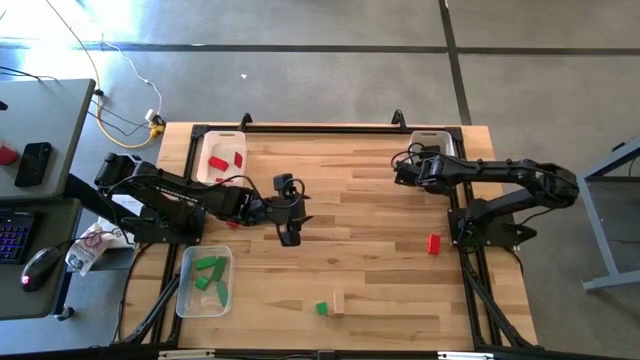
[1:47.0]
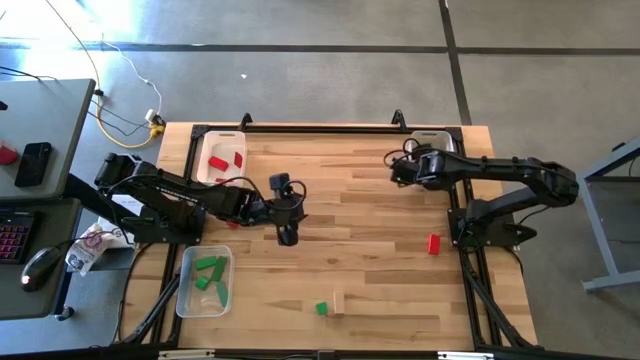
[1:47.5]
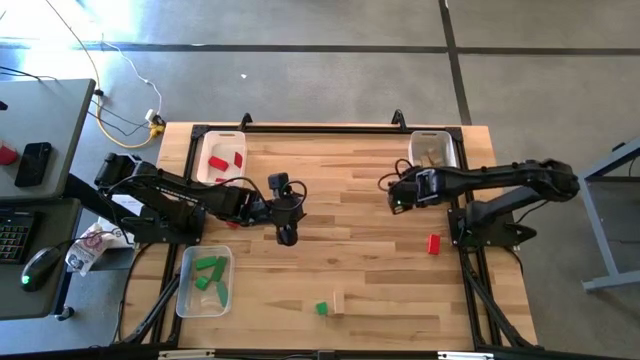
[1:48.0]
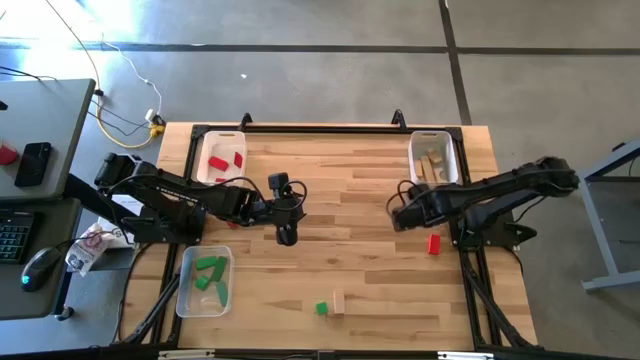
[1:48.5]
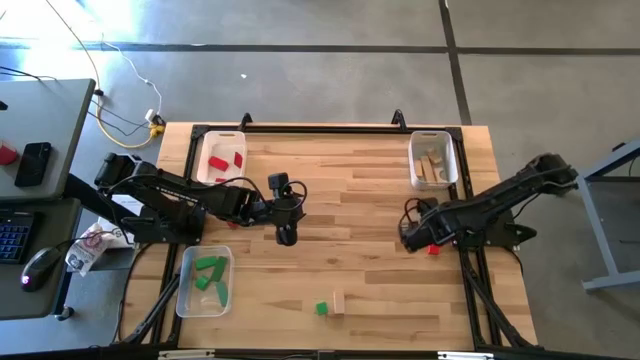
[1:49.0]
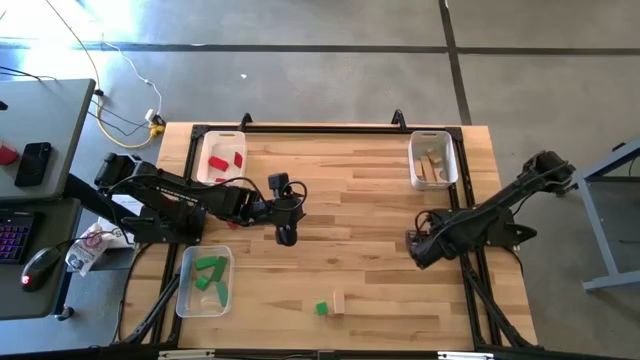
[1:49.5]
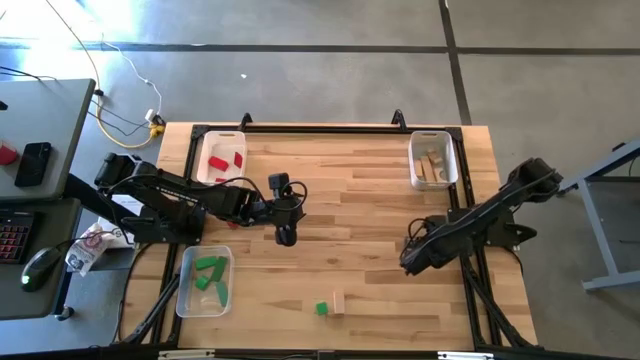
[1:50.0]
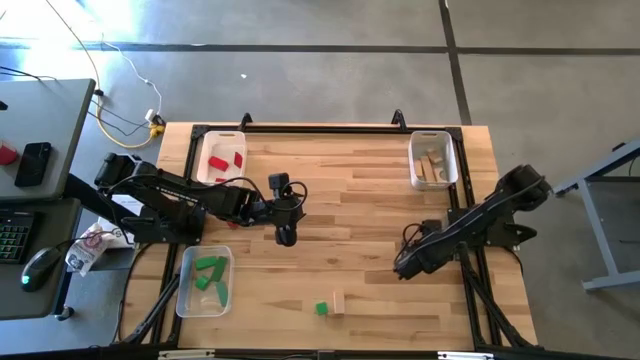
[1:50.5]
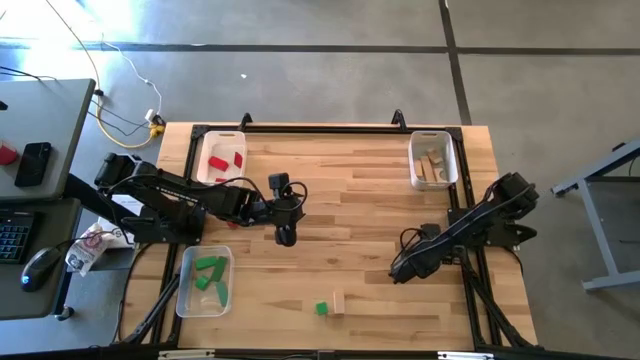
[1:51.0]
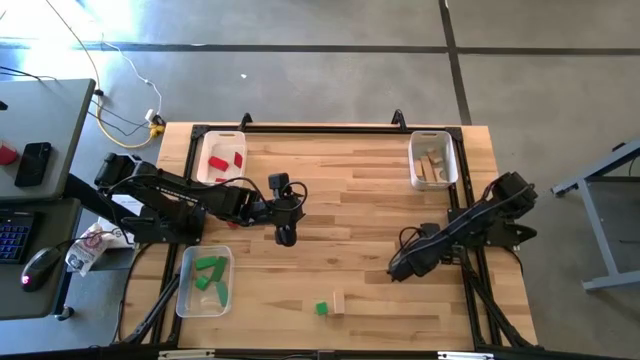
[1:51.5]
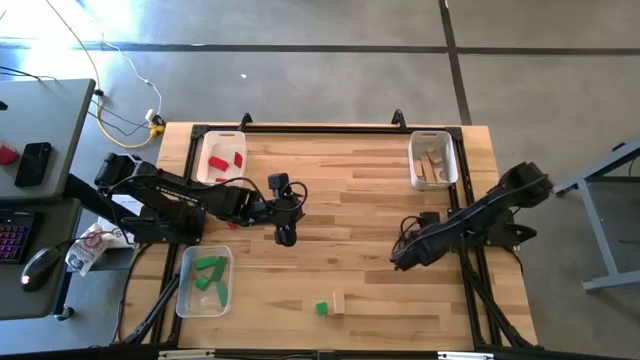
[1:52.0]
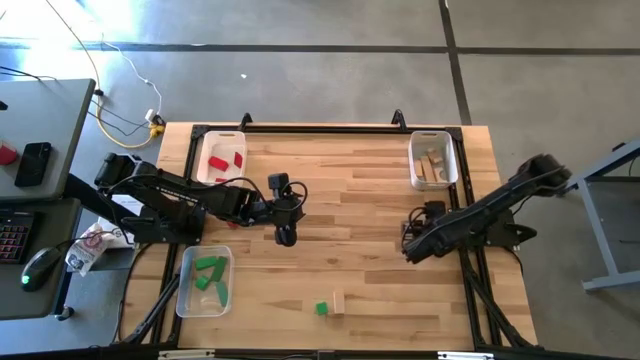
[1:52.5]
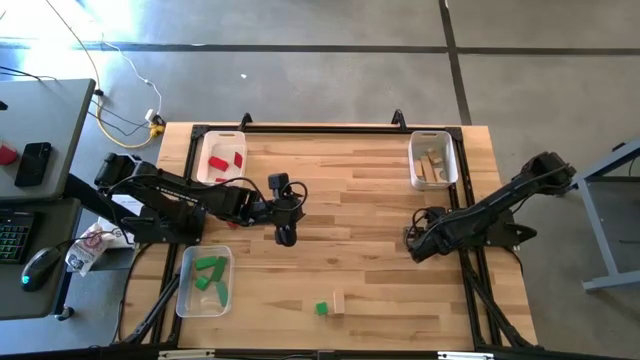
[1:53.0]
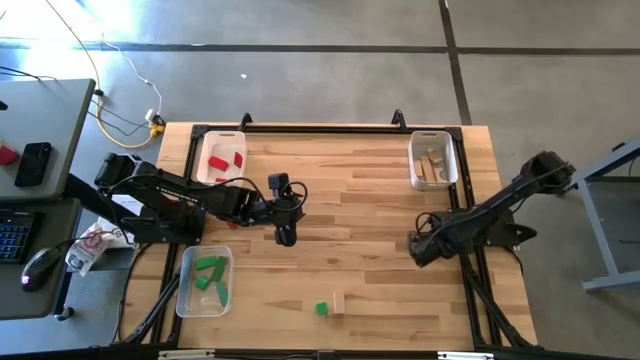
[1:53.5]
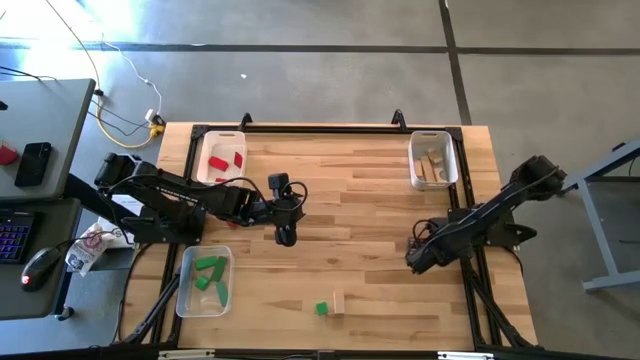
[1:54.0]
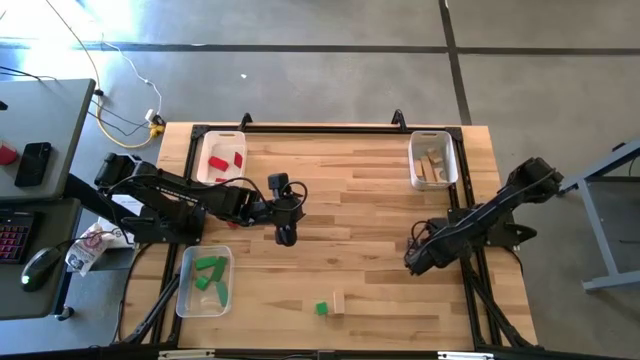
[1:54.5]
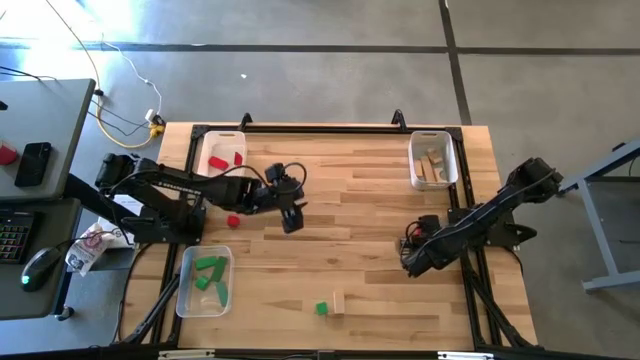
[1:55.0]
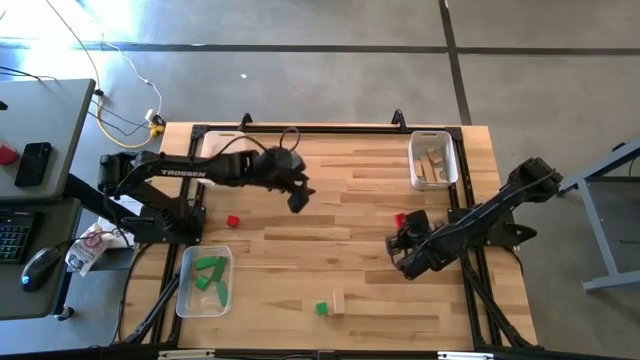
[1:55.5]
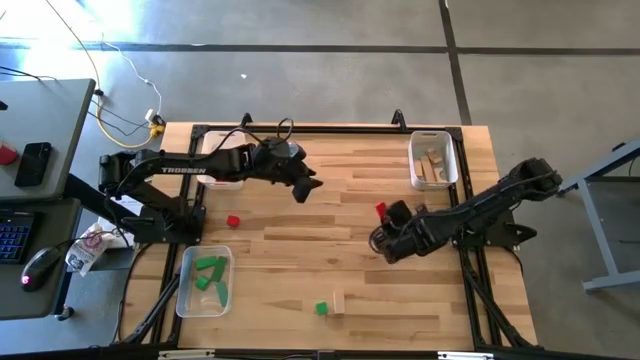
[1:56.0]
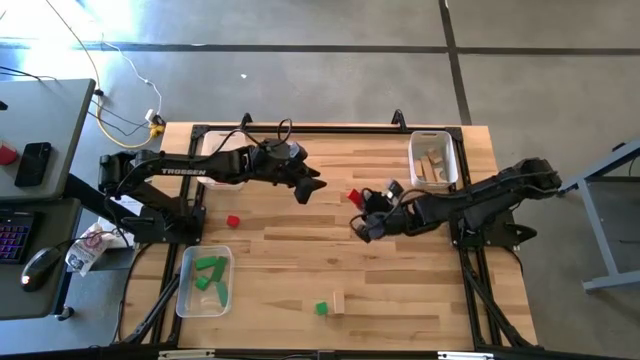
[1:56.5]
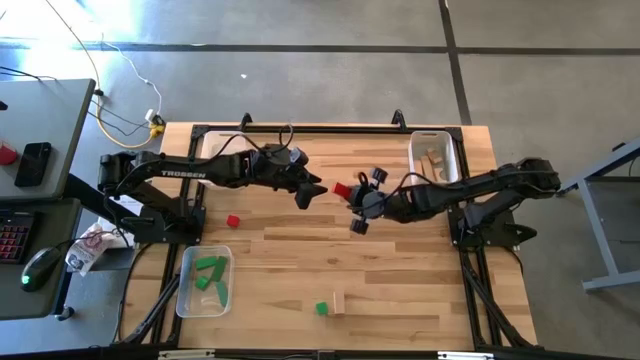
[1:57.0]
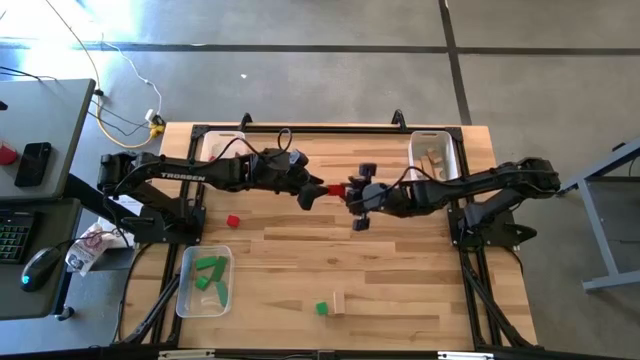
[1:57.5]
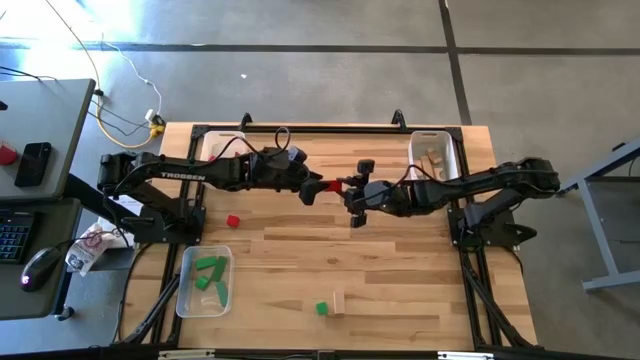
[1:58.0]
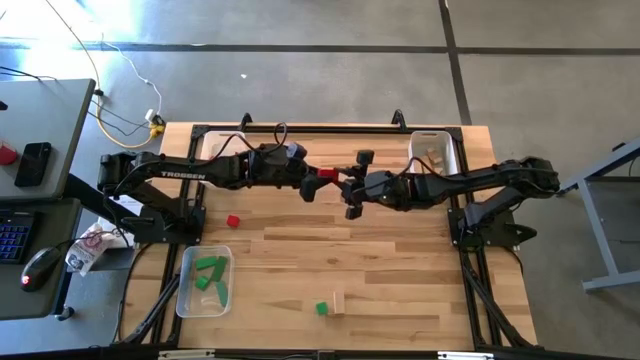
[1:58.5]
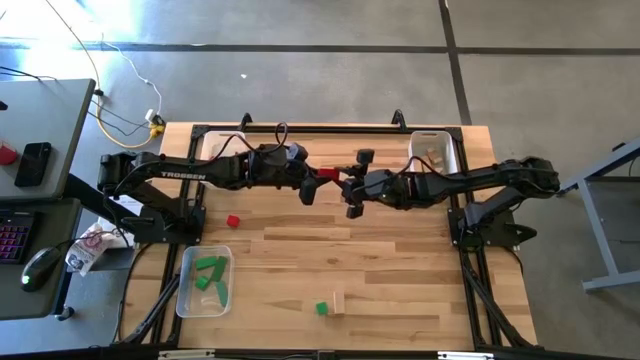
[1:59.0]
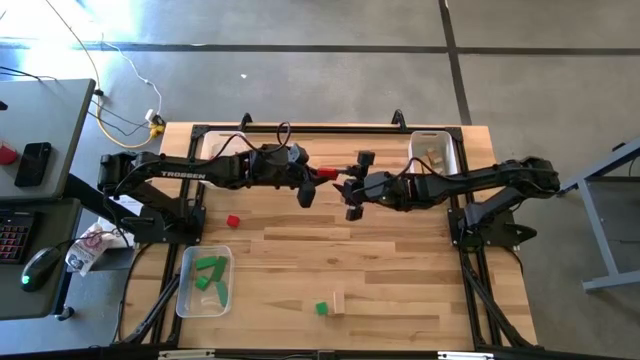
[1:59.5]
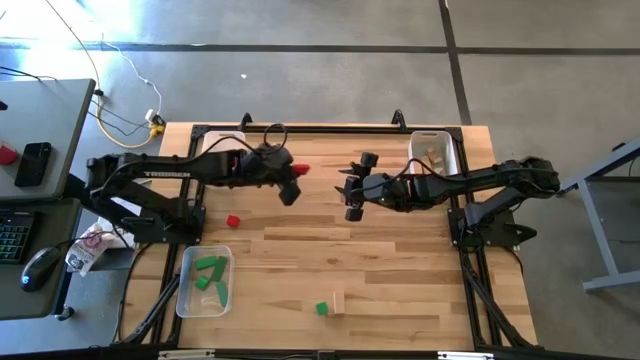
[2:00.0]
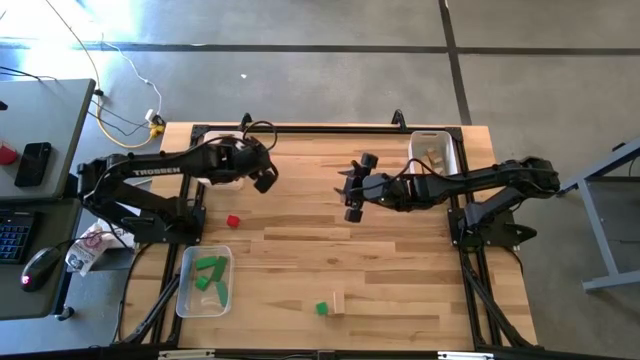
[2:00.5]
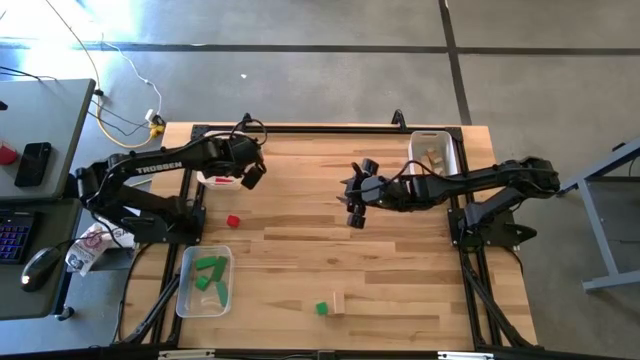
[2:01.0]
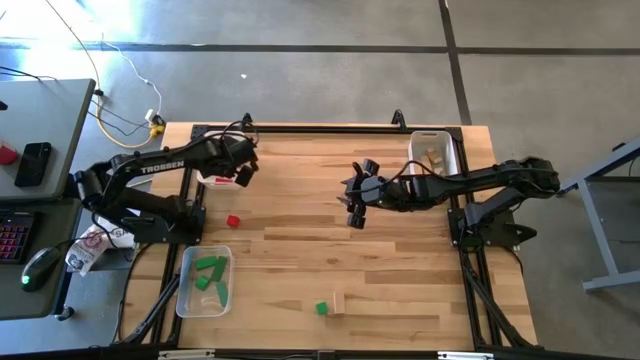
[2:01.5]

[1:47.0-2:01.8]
Task: Sort & place blocks by color
Put the red block into the white bin

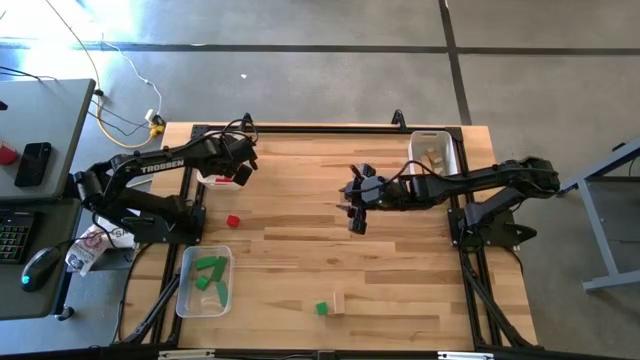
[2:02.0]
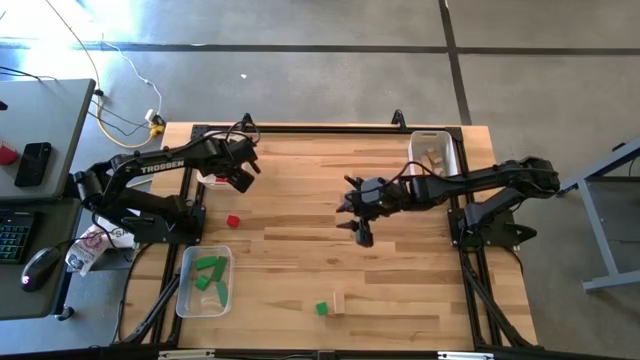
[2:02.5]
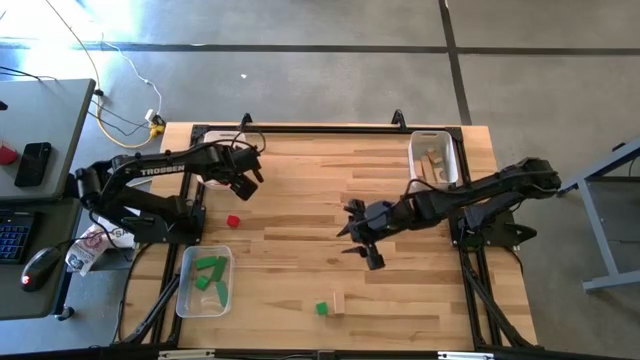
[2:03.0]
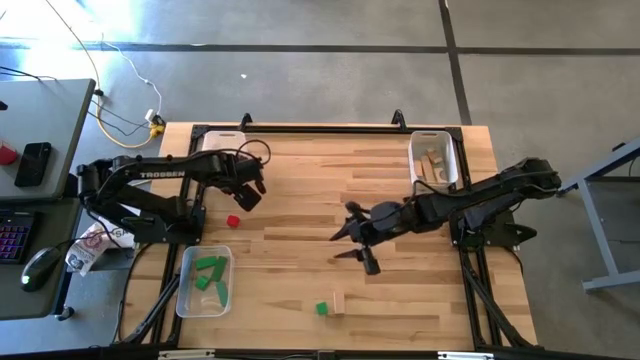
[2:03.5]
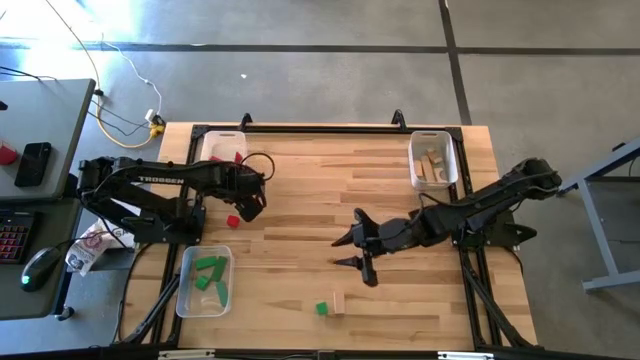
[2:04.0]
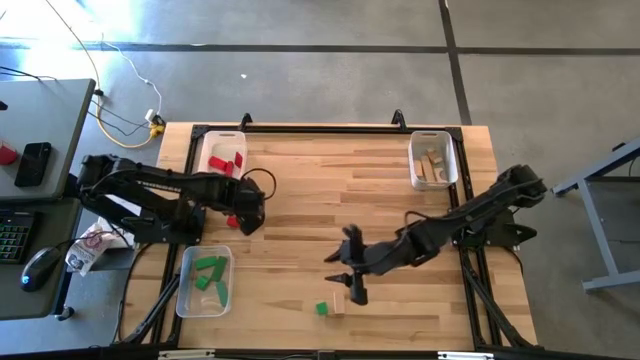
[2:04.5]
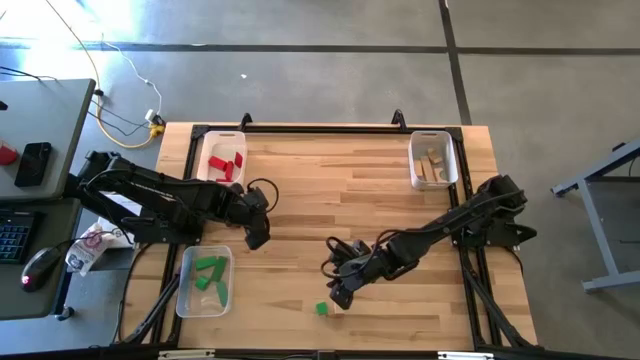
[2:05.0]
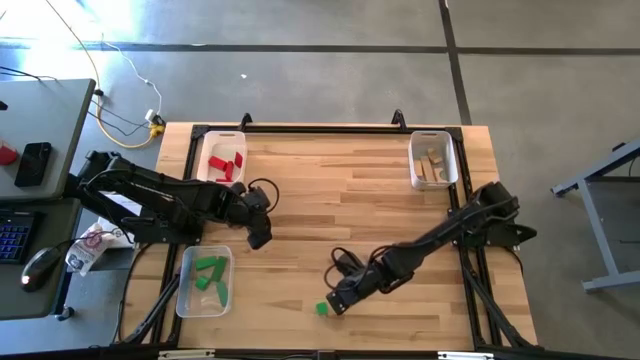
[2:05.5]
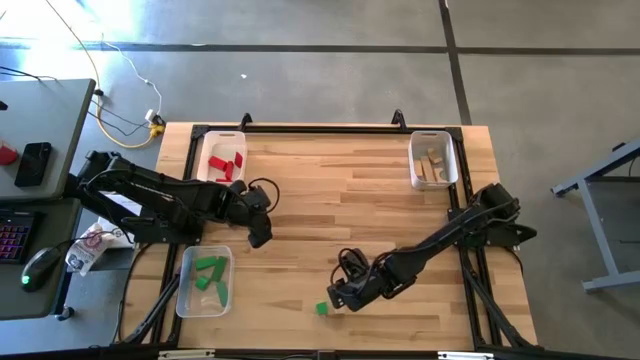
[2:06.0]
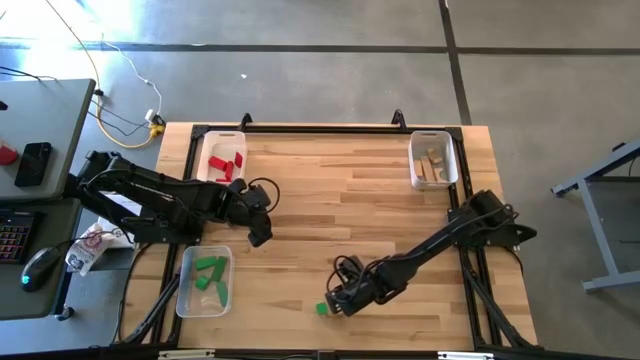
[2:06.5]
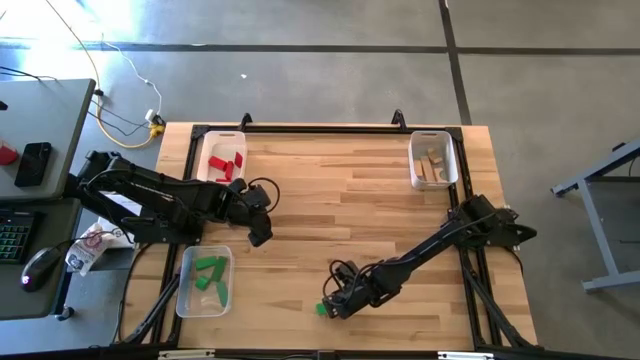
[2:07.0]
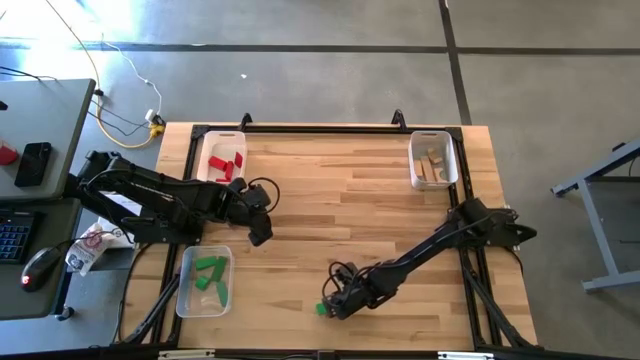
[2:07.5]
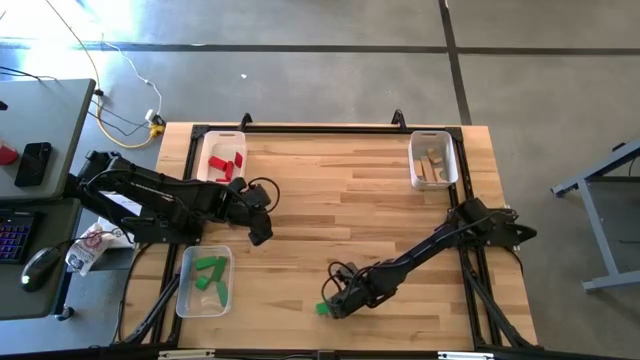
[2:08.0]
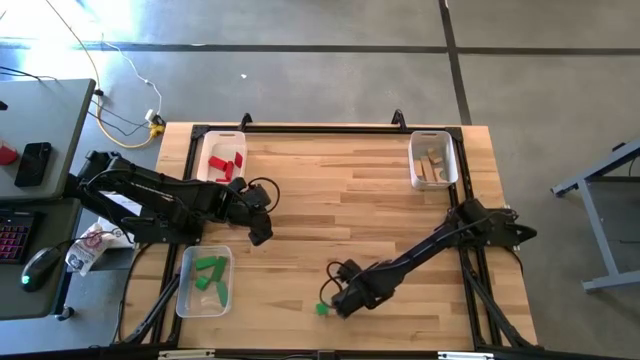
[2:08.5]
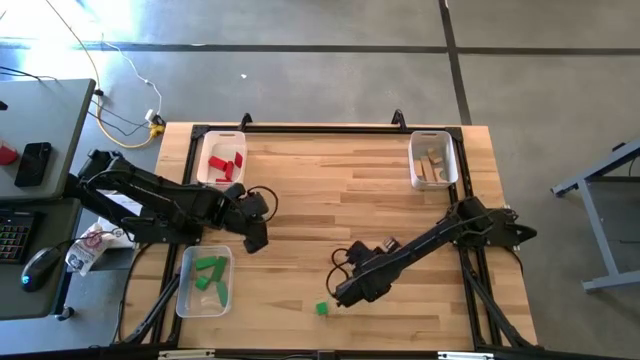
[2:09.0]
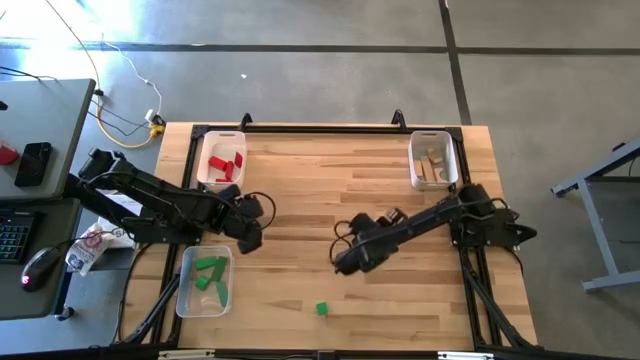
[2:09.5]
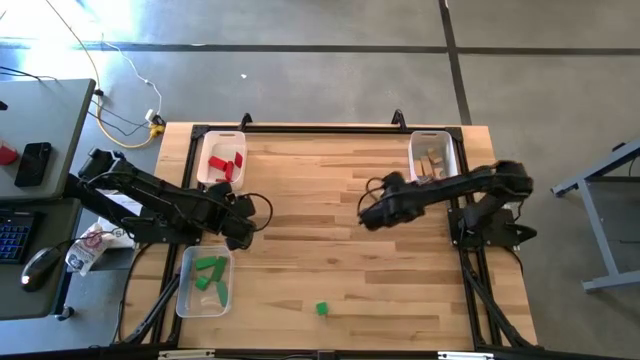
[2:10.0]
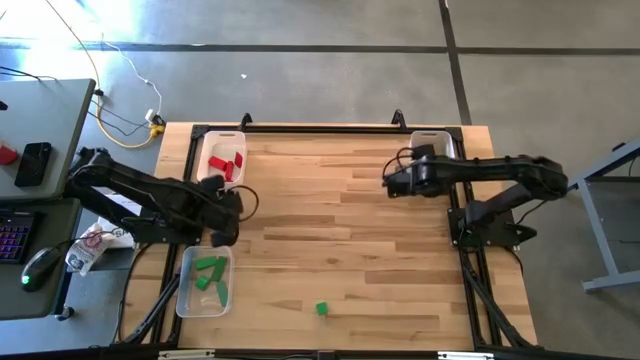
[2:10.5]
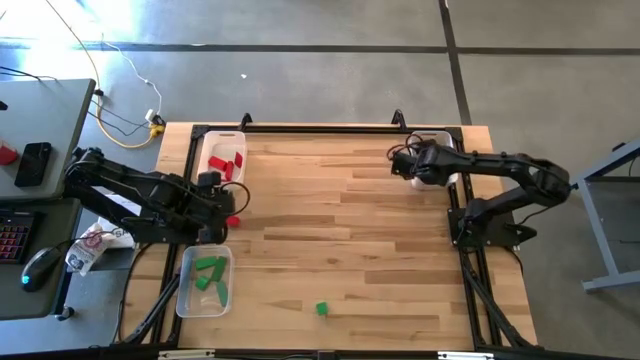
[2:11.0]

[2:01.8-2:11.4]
Put the light brown block into the gray bin
